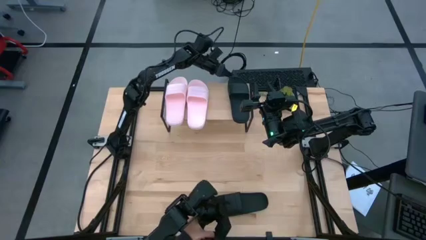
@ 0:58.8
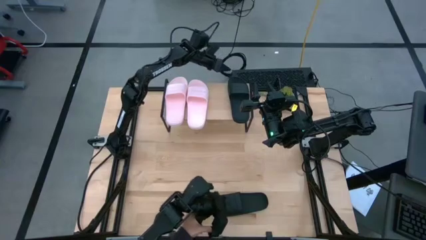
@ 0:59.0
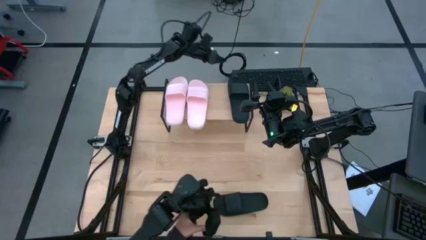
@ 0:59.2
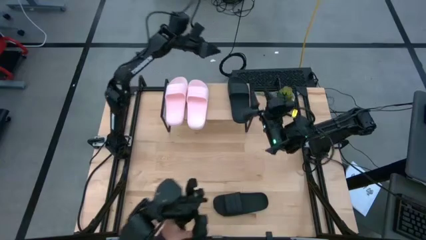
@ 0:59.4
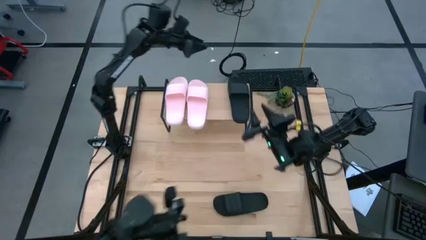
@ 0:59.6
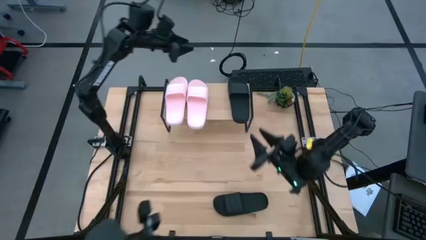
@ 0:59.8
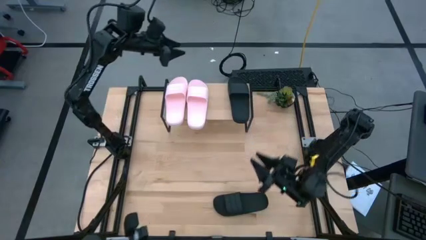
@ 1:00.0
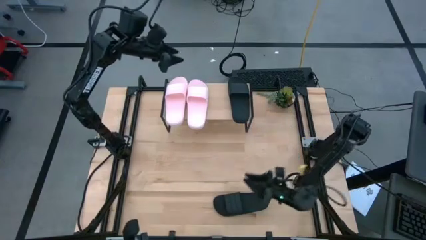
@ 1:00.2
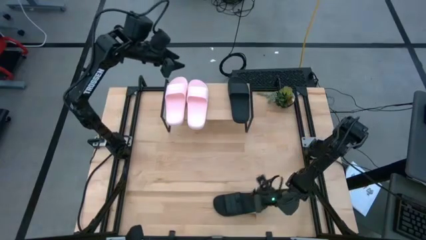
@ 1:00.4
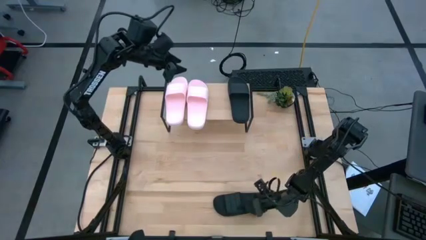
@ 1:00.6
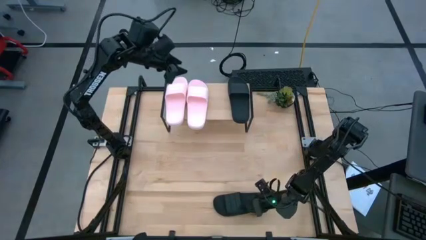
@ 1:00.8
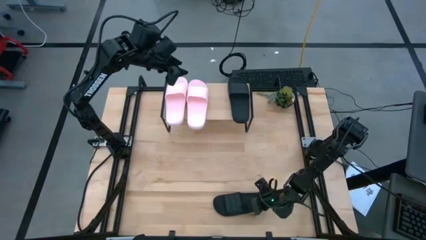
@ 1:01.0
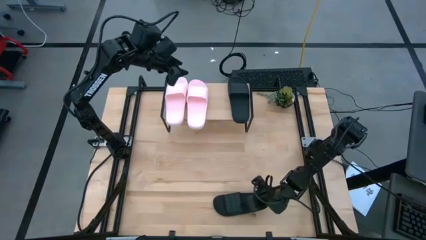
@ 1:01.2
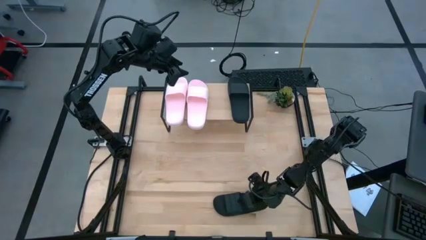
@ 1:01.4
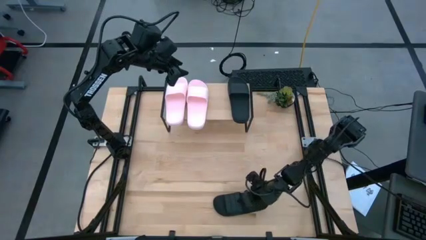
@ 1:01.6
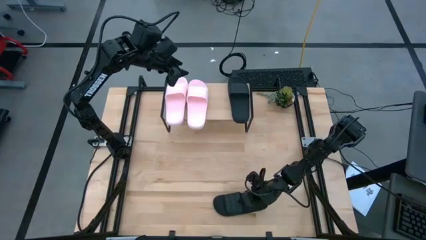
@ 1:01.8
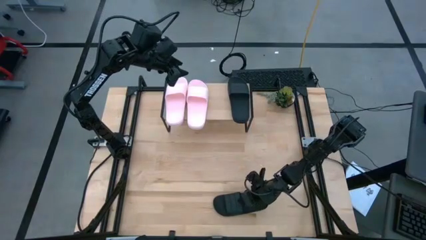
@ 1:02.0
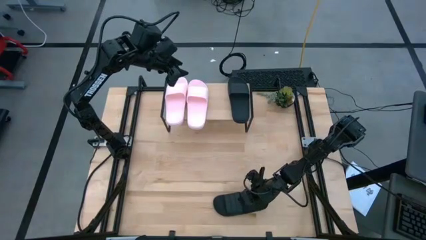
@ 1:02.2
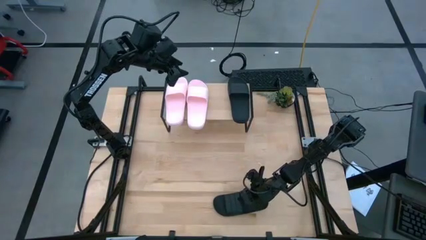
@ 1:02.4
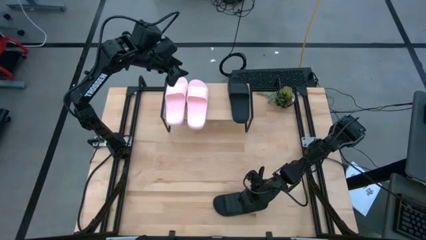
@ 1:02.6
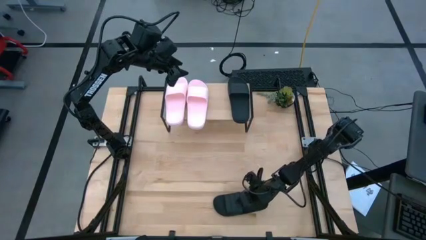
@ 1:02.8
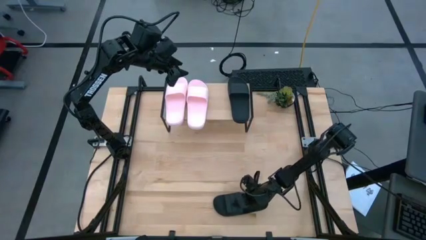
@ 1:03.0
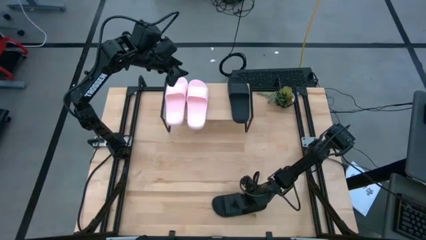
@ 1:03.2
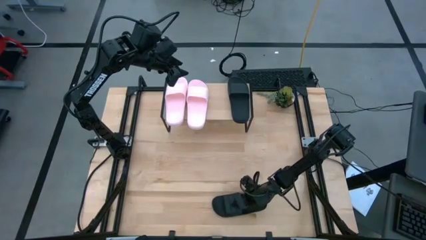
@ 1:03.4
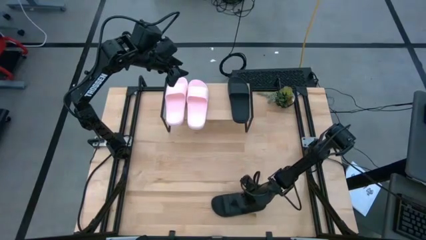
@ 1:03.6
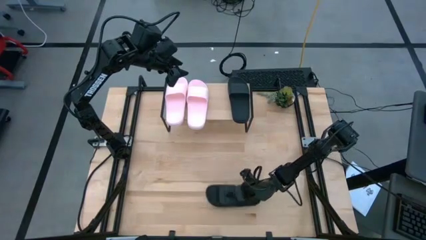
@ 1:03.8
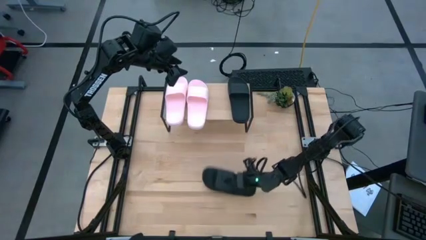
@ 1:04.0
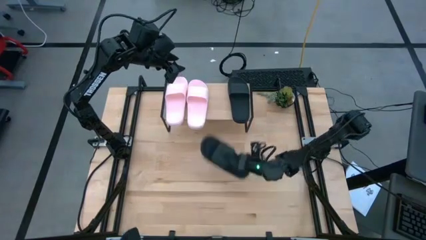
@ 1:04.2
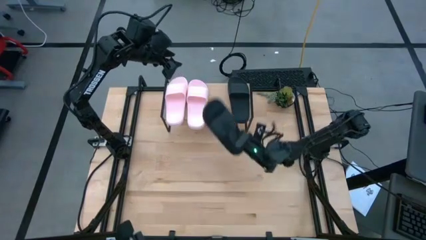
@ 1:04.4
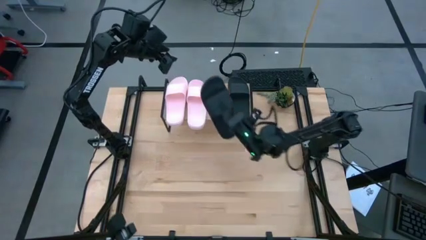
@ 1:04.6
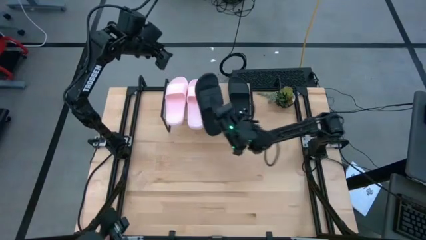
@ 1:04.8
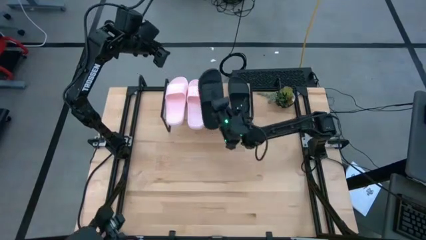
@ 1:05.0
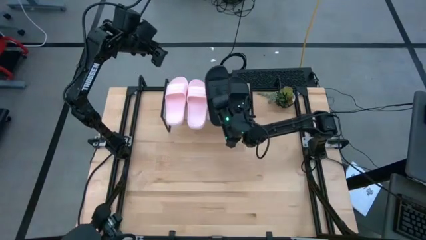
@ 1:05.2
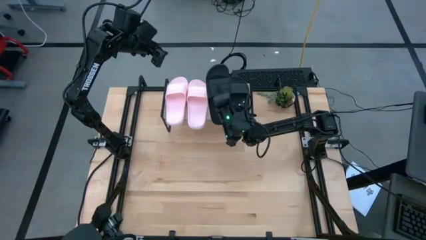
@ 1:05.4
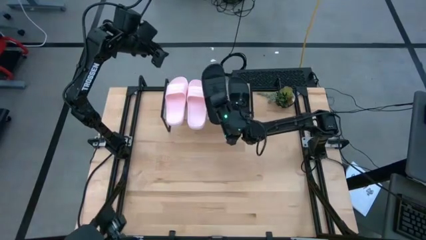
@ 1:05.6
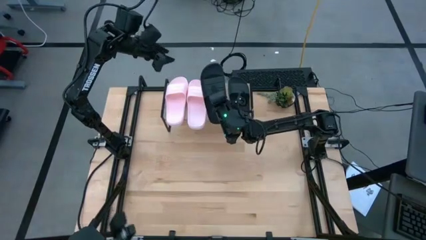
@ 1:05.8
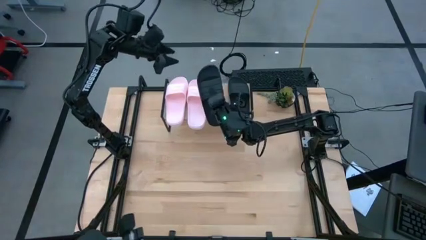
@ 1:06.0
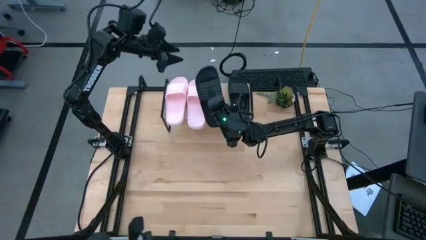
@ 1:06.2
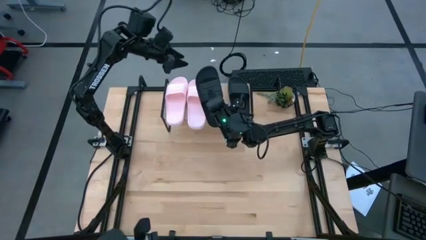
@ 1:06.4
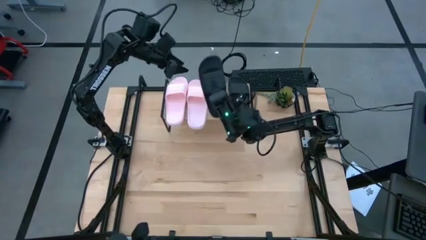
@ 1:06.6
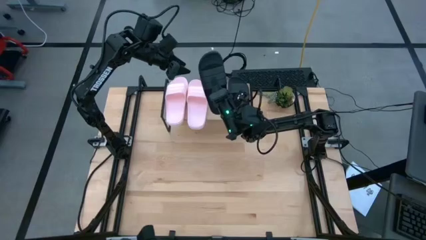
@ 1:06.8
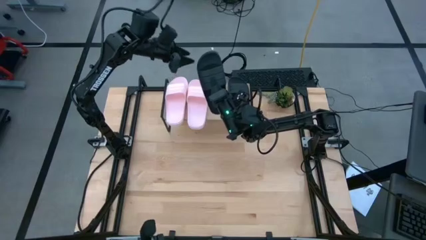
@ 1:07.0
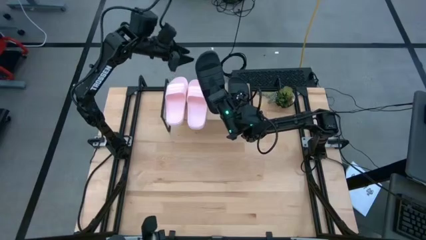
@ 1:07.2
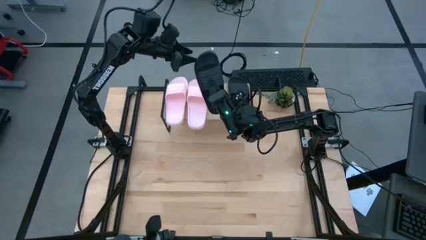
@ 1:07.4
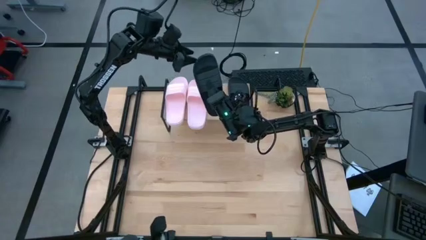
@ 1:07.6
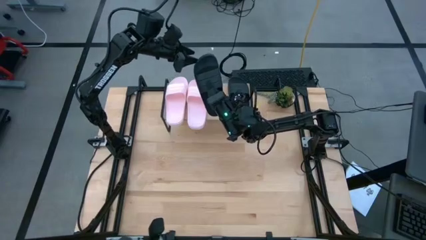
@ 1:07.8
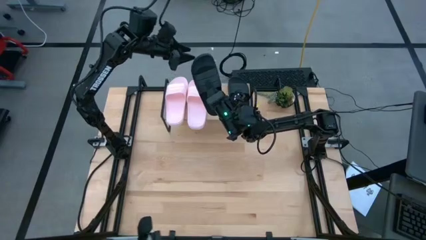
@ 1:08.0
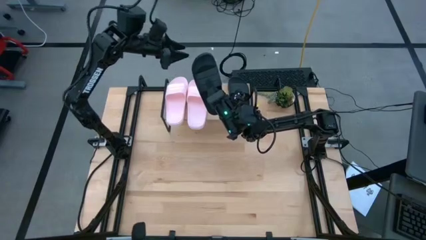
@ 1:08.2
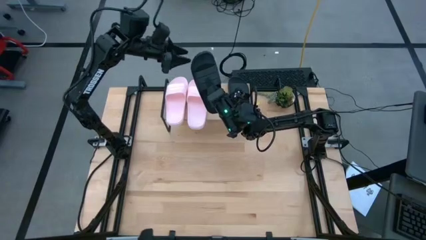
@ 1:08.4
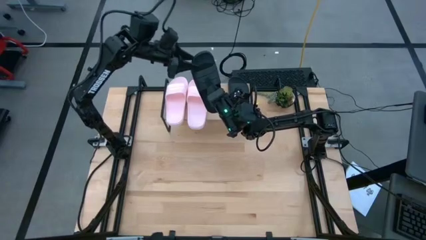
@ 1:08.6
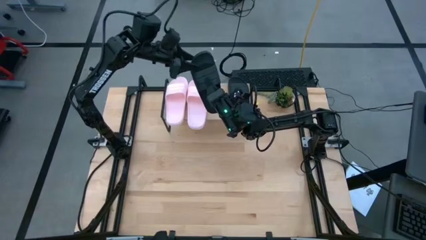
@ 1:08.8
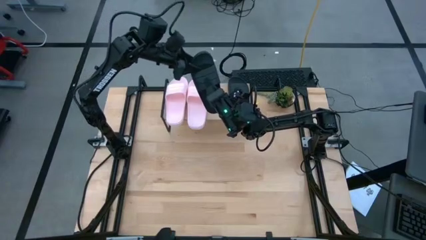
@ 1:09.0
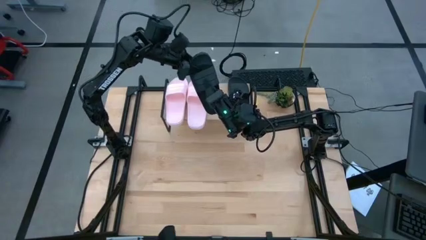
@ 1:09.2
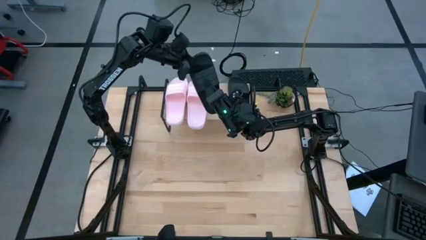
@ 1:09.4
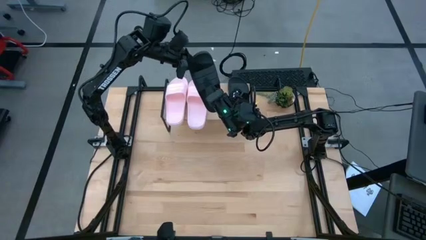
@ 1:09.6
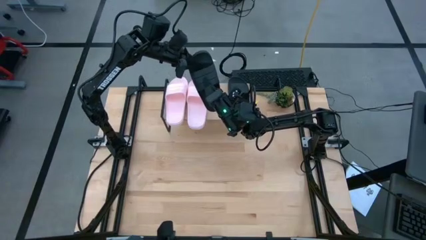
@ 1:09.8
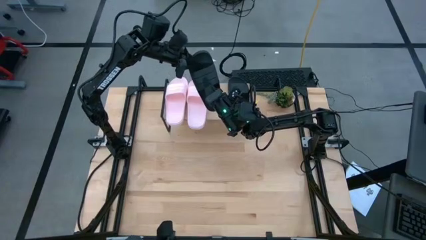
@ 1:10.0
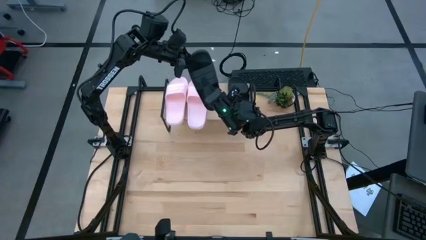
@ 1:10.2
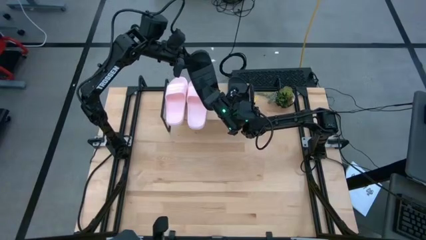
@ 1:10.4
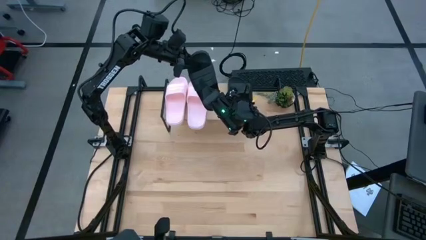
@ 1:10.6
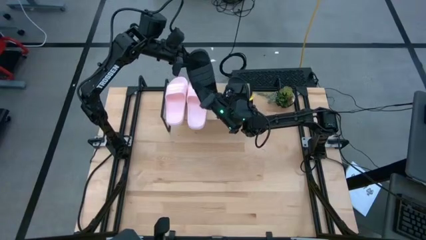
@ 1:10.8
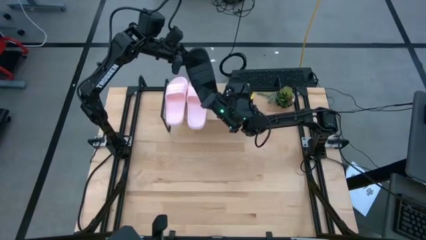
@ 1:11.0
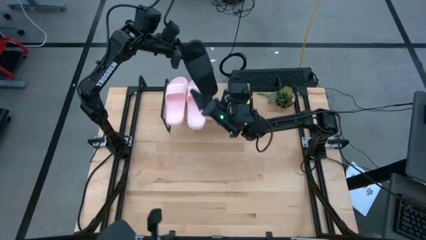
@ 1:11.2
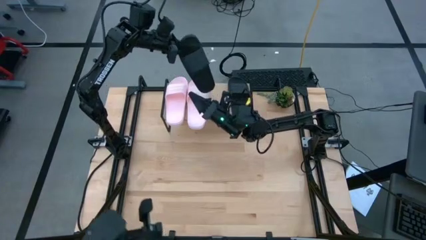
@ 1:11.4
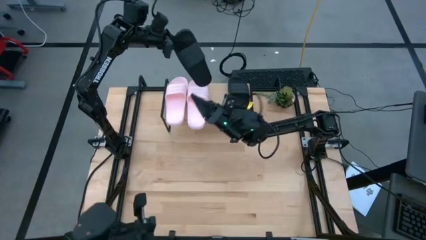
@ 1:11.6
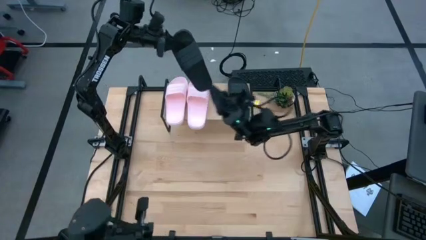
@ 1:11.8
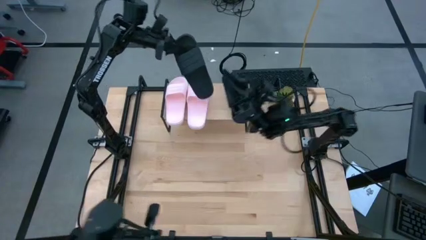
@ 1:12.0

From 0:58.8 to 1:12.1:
Task: Pick and place slides into the shelf
Put the black slipper on the shelf

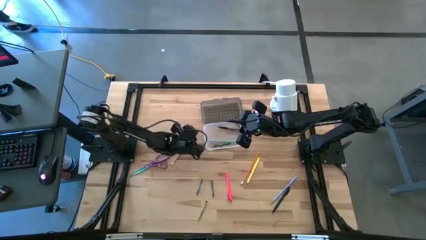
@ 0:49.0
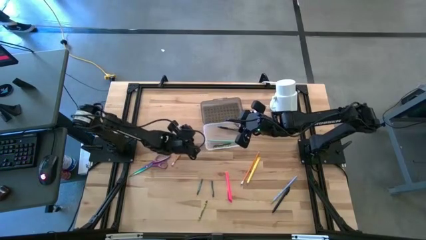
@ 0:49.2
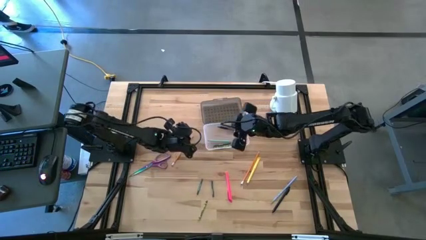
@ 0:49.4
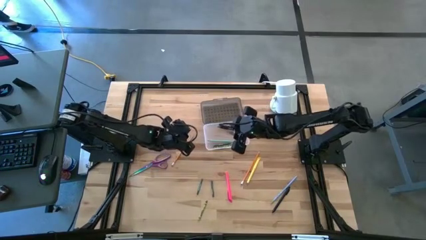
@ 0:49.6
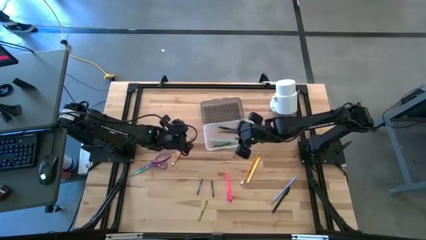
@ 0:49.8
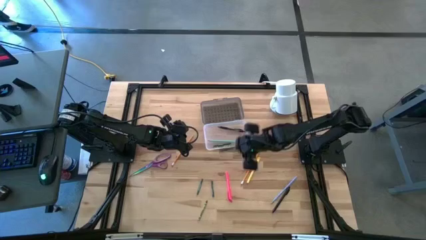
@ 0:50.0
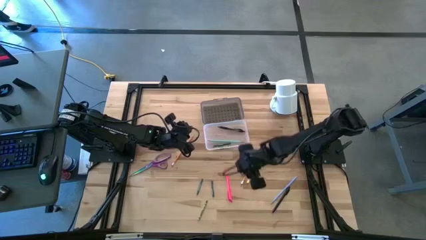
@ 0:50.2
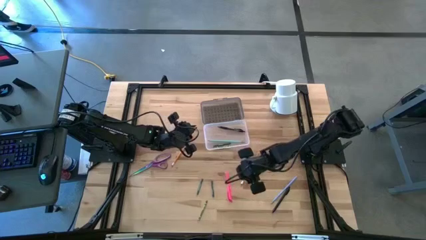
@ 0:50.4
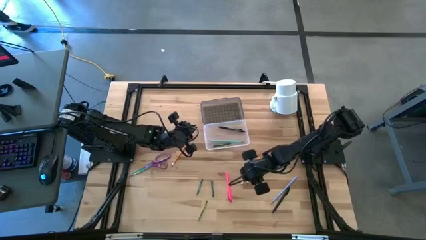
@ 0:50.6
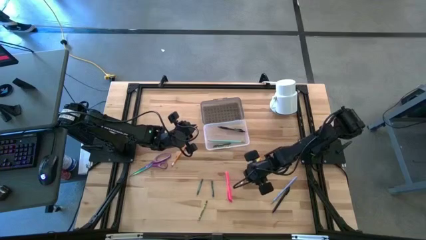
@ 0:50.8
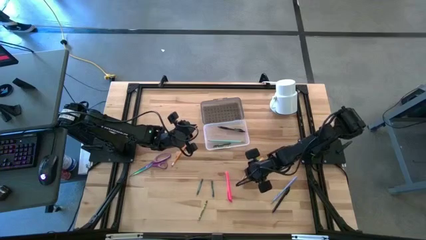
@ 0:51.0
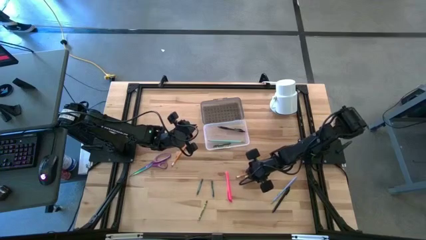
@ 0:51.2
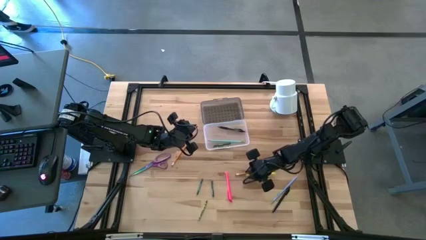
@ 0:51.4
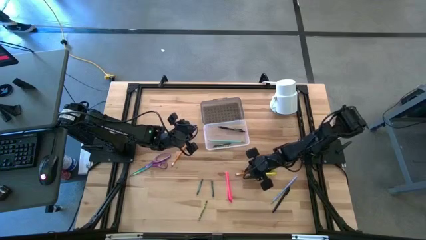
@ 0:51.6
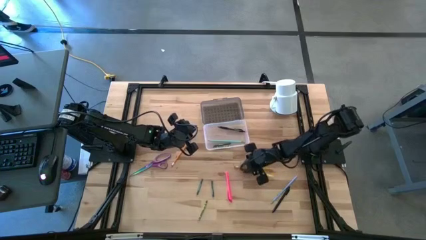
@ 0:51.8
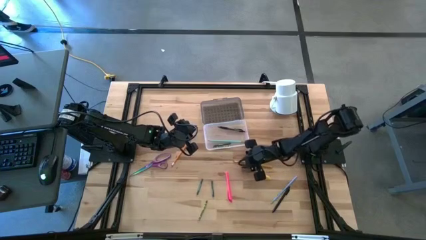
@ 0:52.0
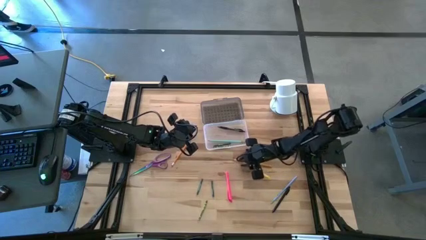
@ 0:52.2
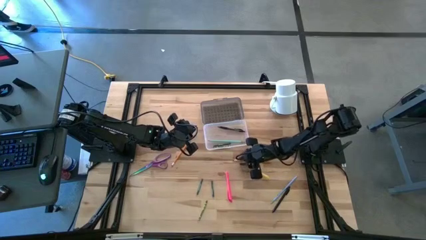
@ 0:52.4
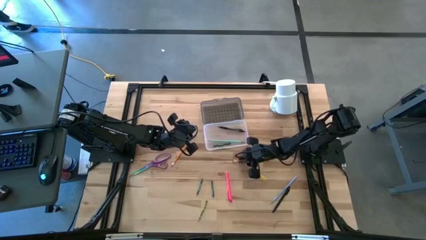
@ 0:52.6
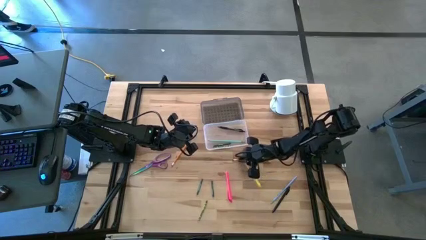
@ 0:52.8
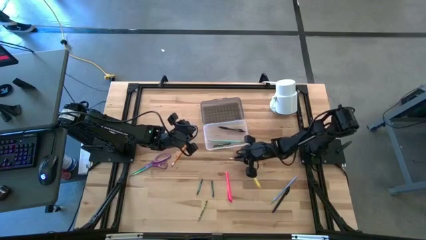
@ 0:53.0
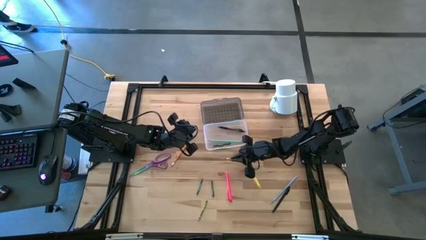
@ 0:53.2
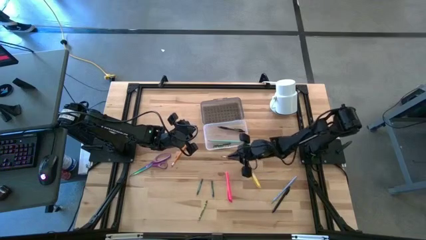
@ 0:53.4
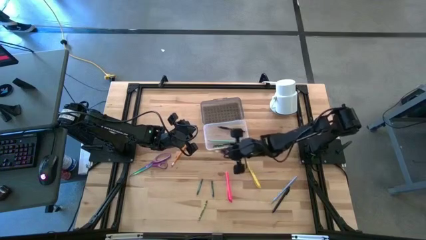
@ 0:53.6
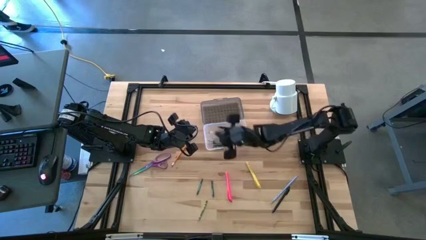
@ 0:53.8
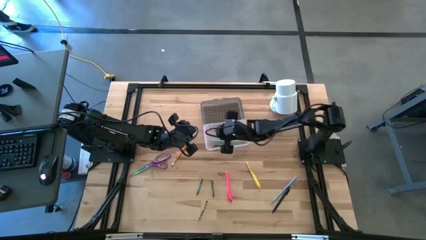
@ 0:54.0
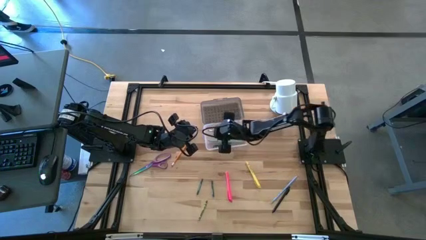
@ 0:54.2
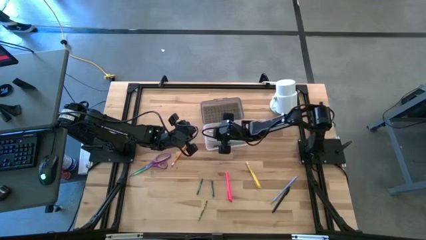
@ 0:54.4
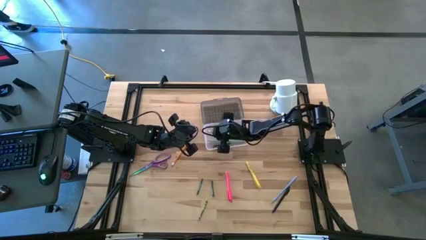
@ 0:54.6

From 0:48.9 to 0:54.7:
Task: Pick & place school supplies into a supply box
Put the right orange pencil into the gray supply box
